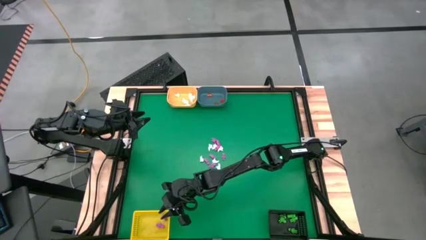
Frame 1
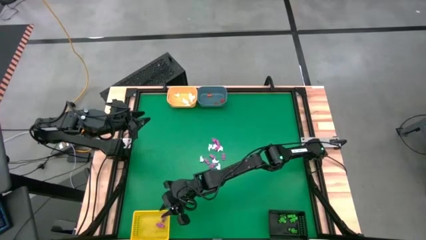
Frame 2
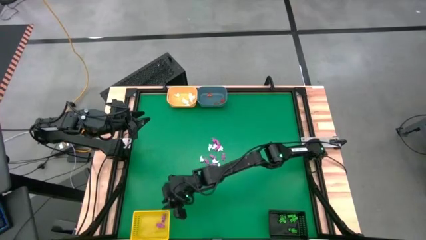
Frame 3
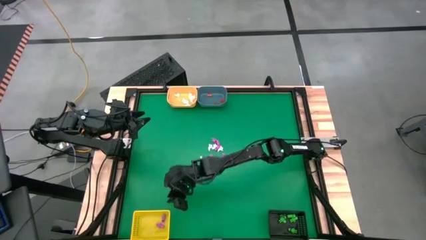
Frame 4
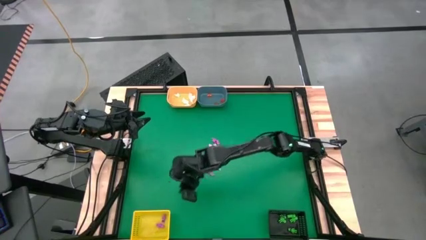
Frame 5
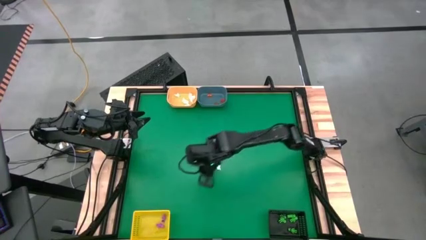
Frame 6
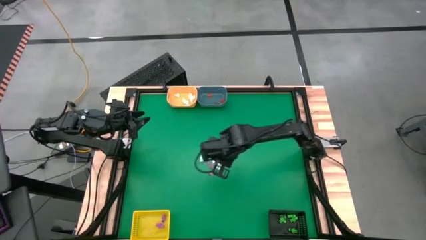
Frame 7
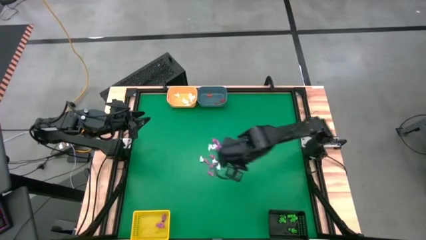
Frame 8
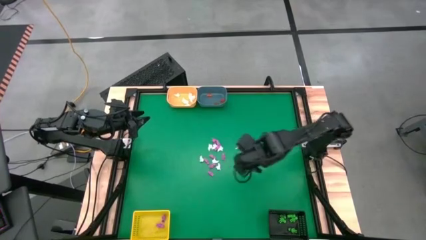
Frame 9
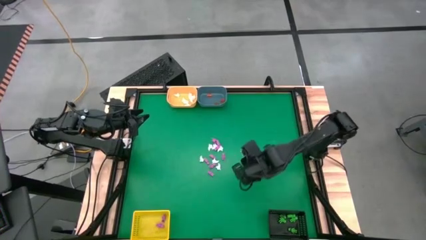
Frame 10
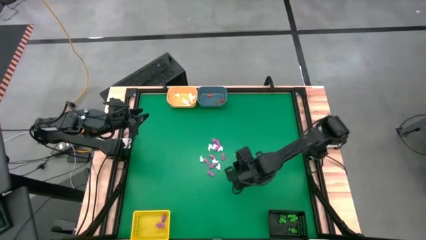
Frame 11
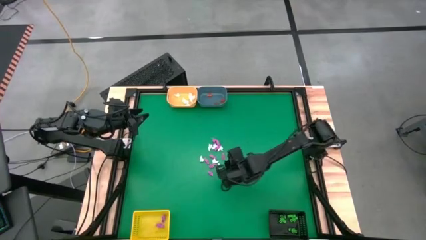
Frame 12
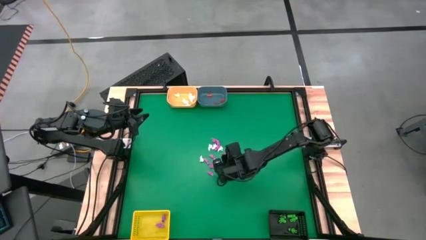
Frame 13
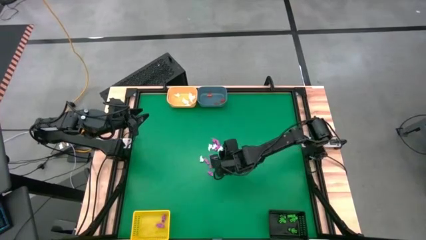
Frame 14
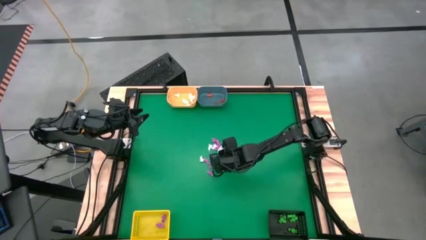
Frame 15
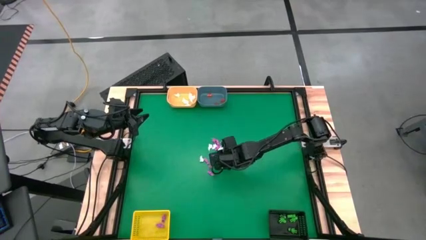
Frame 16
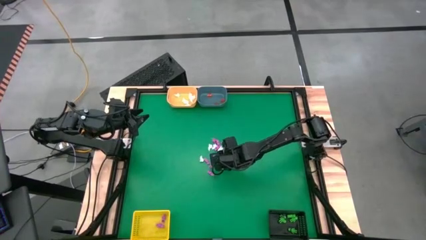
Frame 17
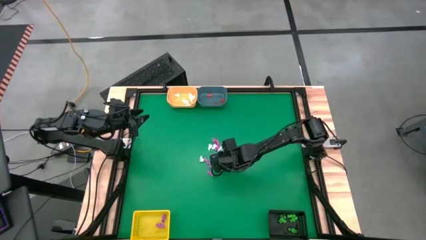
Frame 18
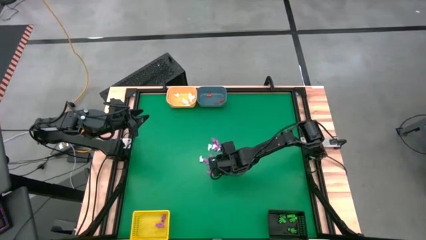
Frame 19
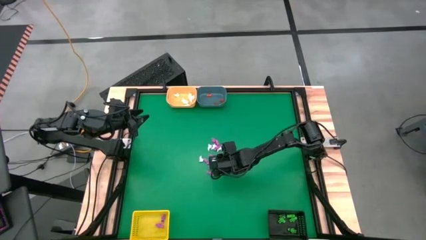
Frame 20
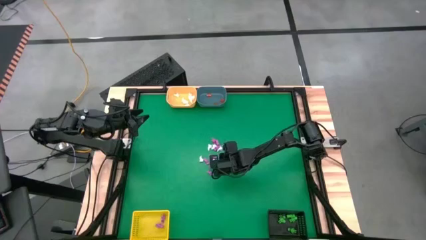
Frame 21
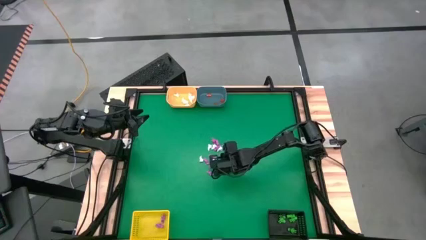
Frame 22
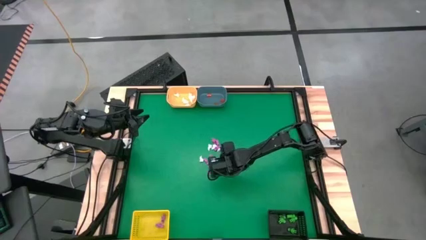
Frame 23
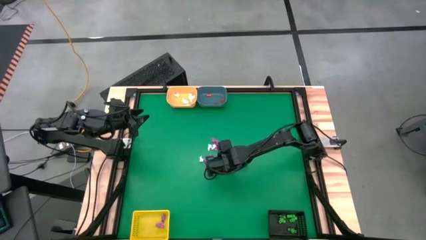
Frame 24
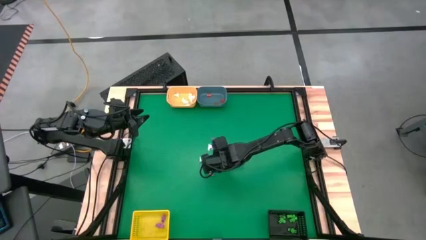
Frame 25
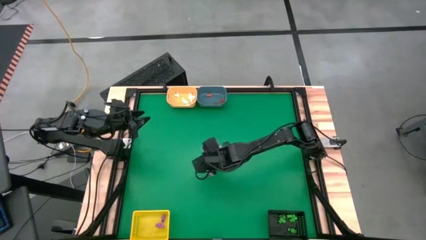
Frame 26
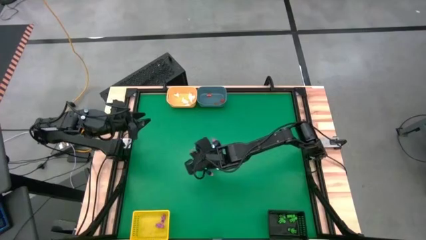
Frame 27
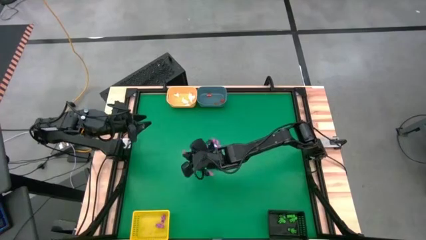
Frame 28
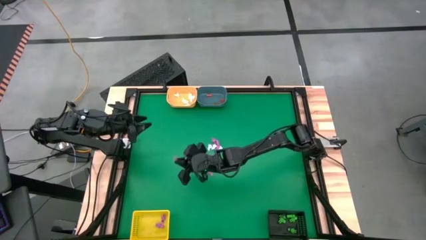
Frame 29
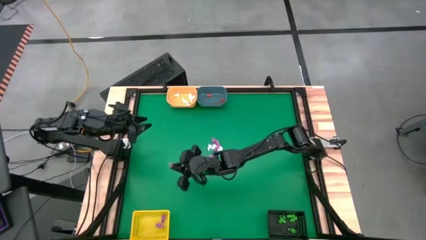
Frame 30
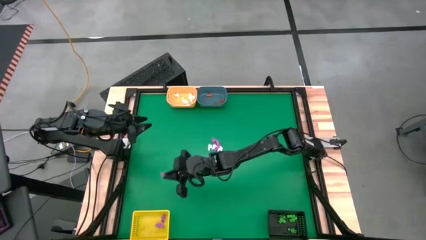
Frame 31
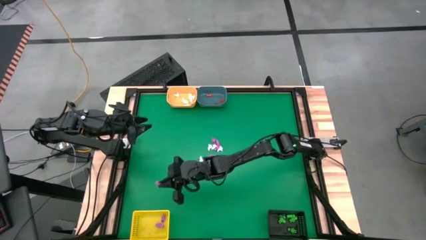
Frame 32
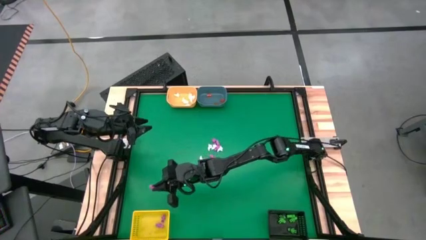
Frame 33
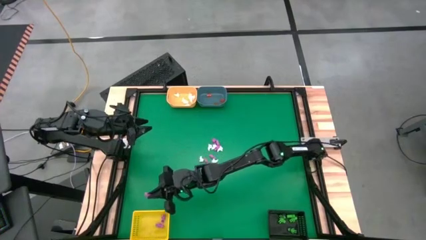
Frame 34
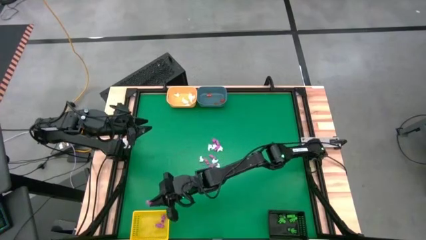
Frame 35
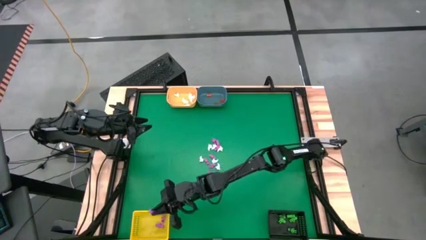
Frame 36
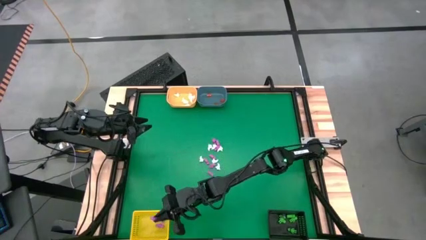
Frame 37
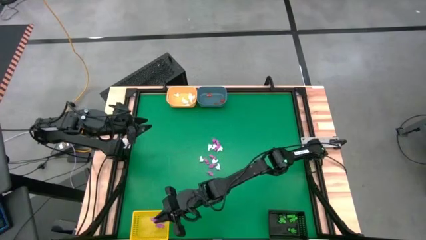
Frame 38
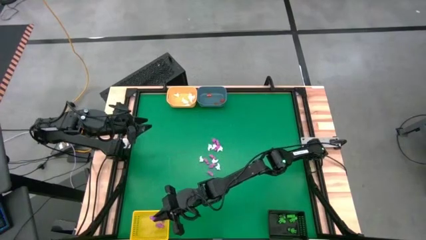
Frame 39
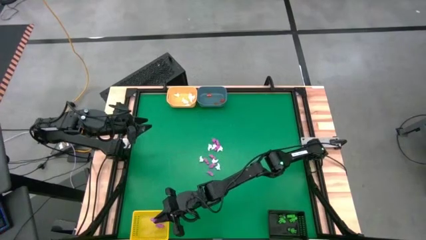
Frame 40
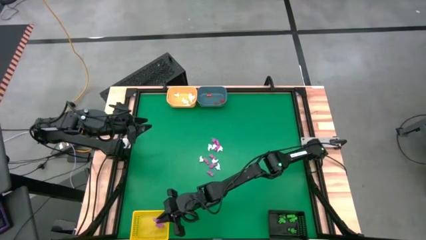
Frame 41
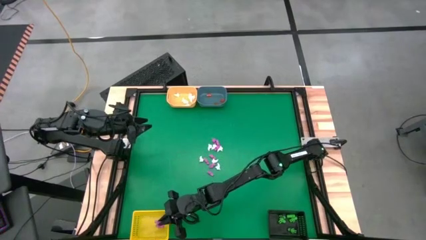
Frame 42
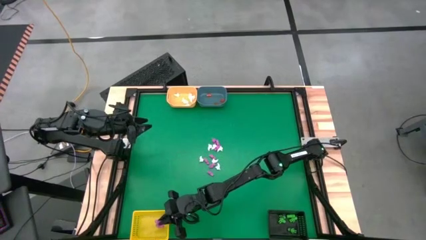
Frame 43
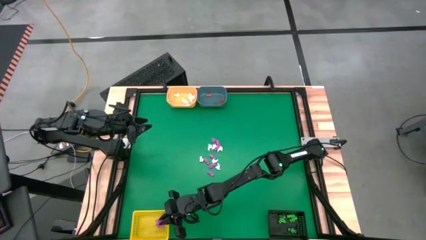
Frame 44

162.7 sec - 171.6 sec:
Task: Sort Halloween decoration
Put the pink skeleton into the yellow bin

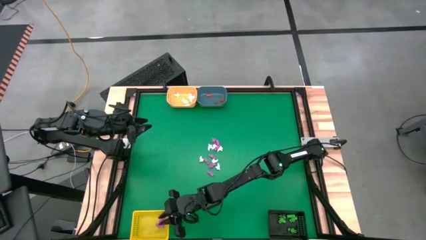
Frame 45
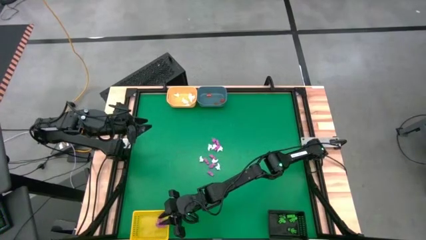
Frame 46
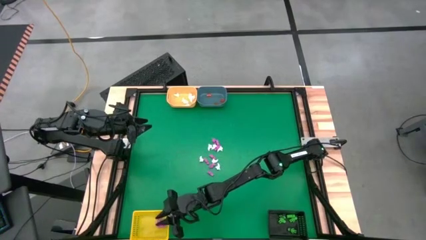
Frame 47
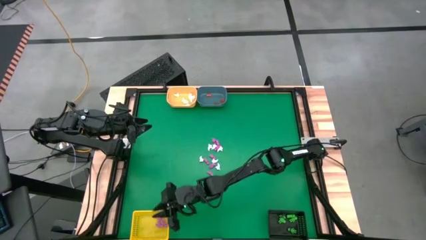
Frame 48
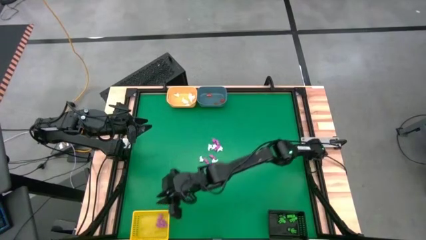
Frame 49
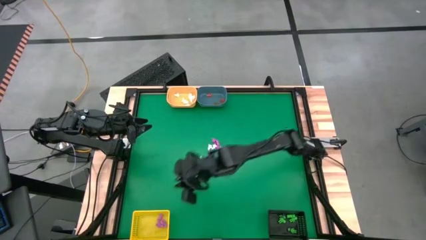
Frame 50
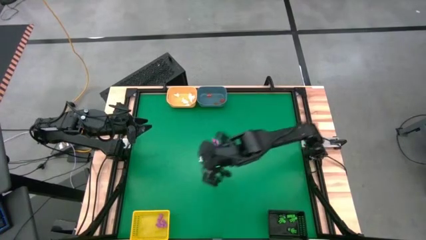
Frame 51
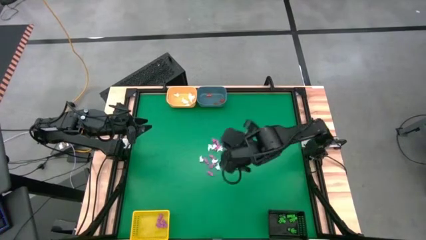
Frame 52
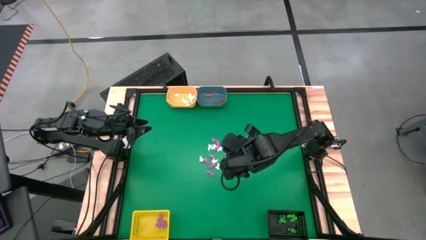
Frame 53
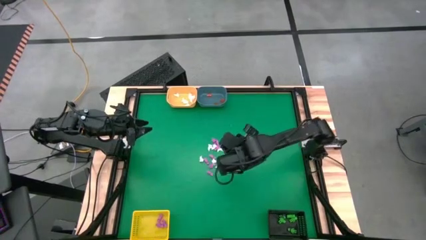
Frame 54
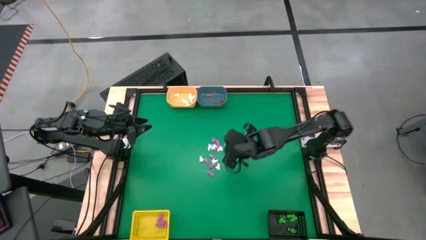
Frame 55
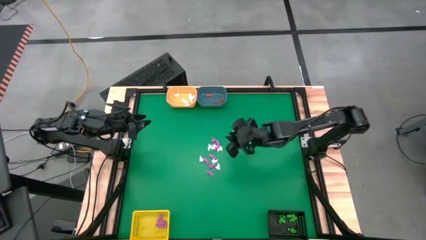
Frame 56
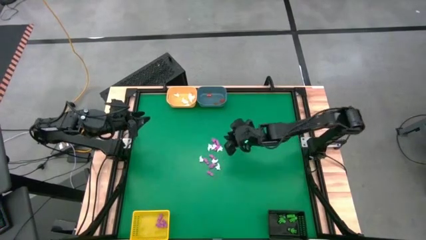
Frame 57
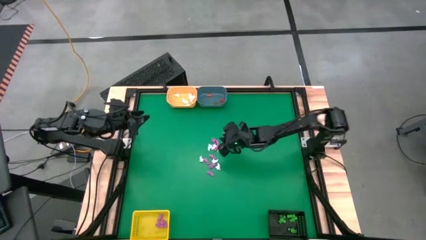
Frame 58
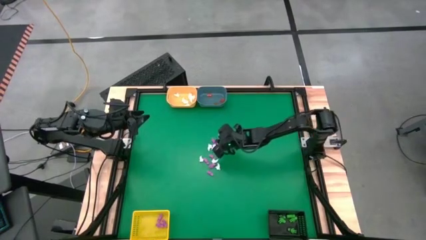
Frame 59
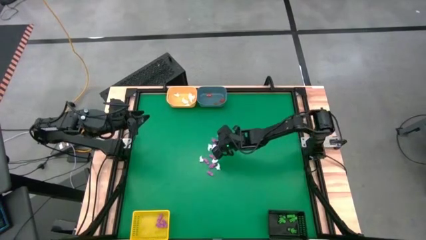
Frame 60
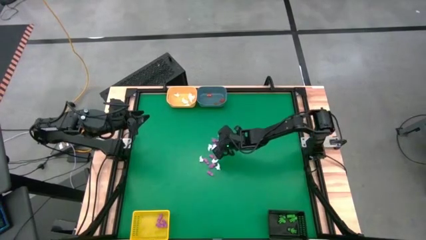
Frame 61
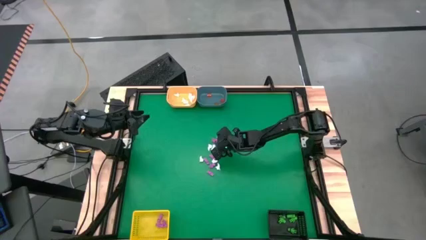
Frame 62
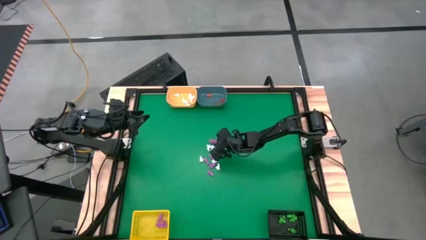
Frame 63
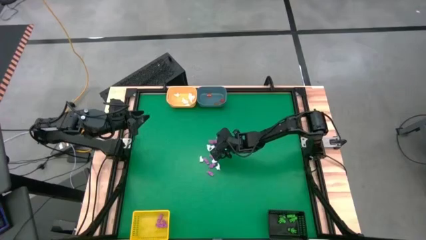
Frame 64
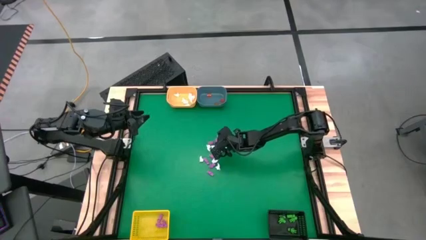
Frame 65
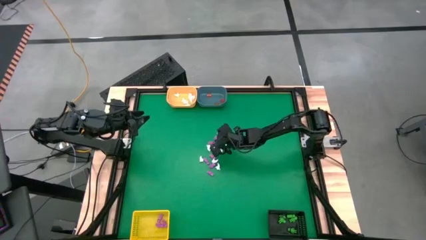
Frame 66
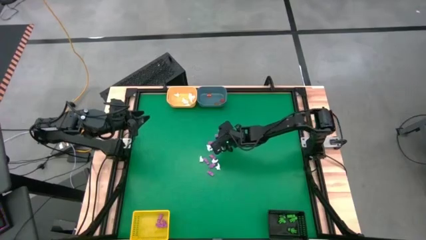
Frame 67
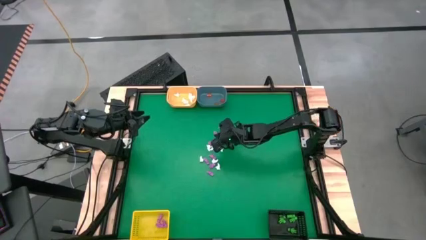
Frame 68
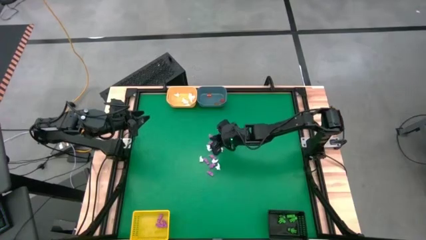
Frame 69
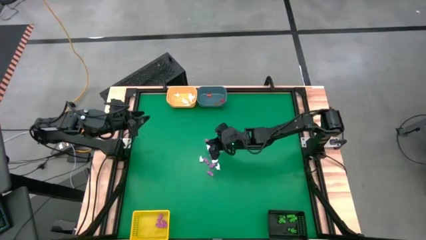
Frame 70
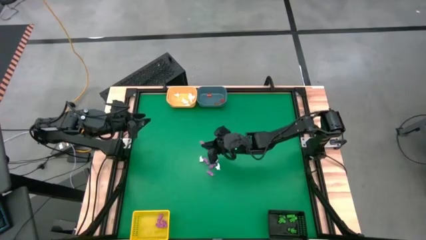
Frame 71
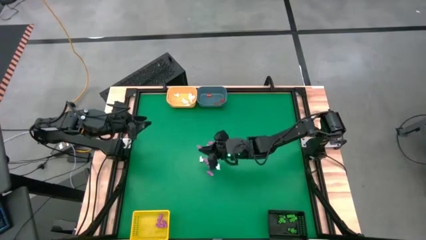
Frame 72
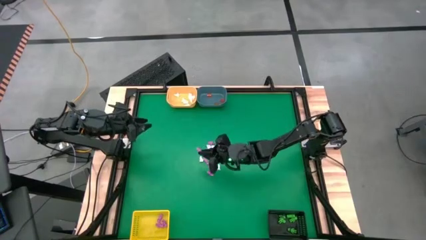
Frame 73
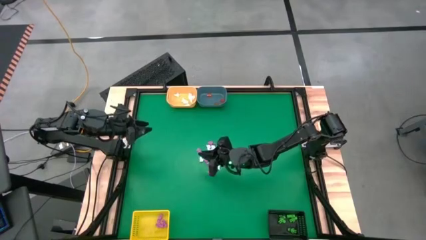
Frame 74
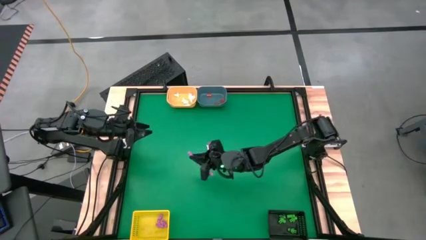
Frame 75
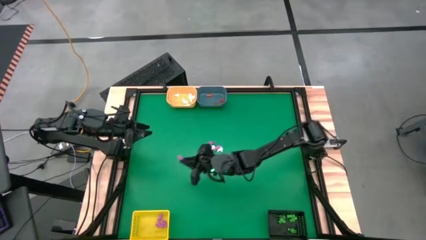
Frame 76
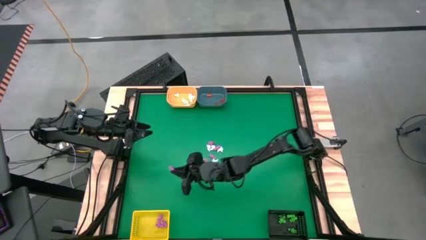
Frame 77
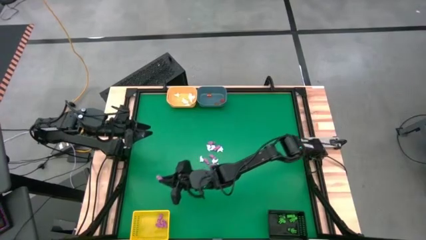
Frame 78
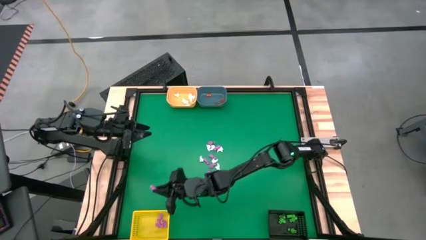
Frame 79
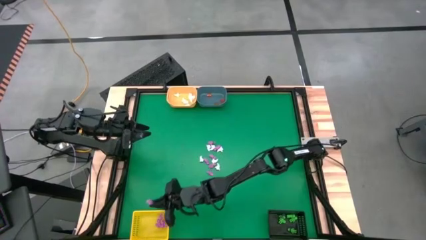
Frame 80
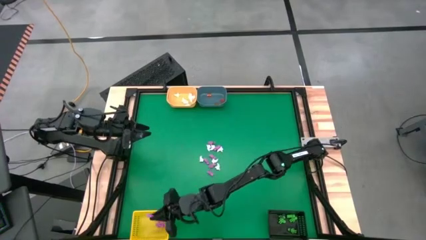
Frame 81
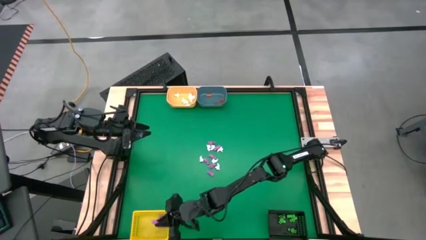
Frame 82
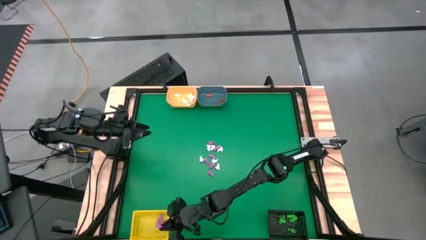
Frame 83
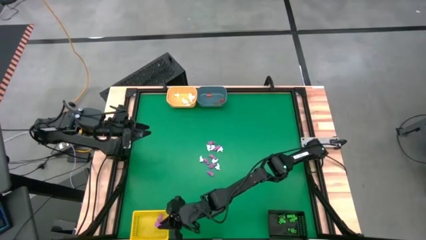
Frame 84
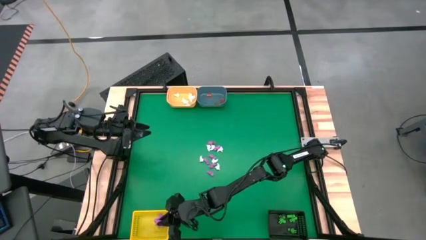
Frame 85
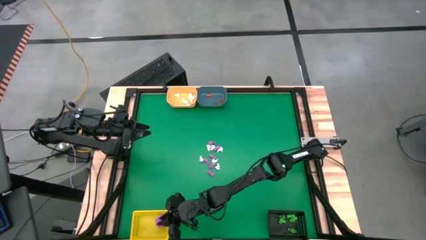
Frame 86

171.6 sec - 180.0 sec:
Put the pink skeleton into the yellow bin
